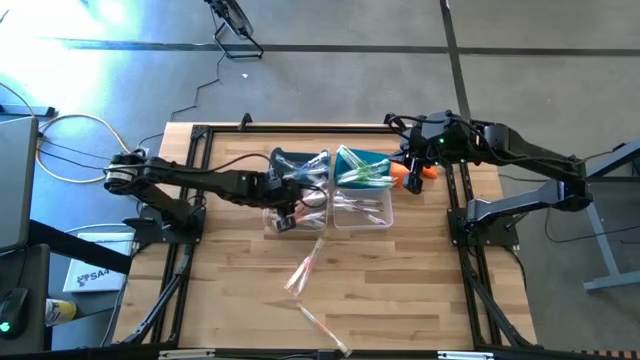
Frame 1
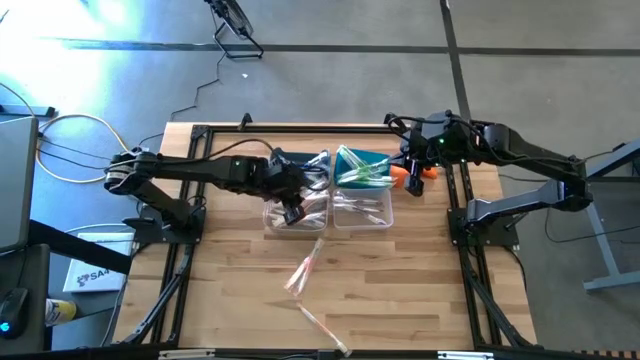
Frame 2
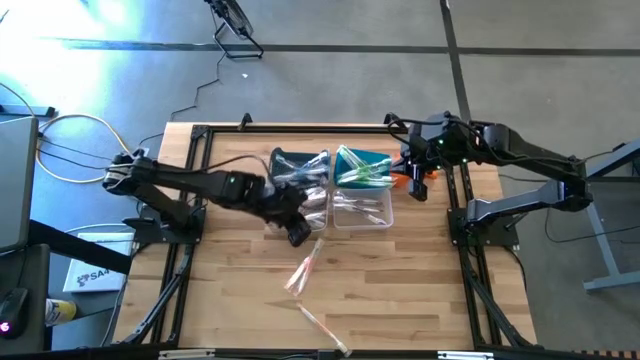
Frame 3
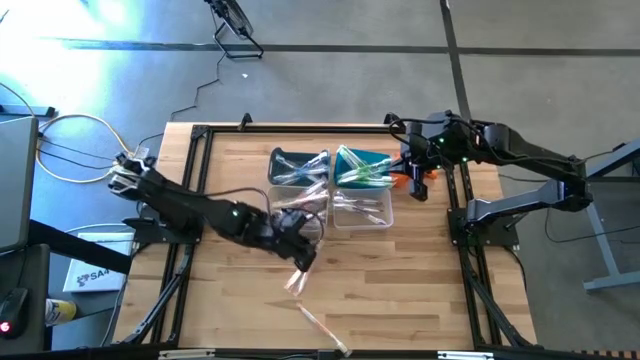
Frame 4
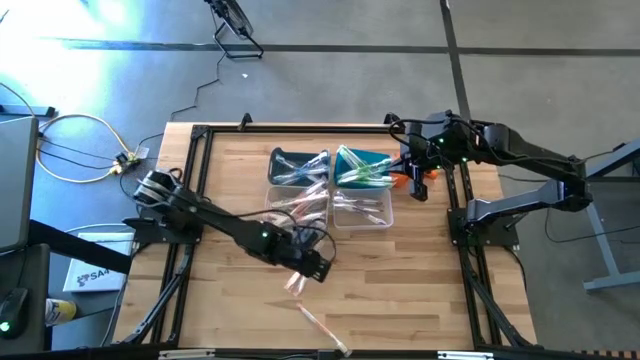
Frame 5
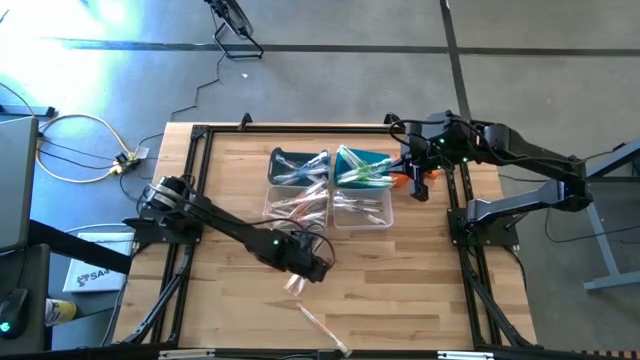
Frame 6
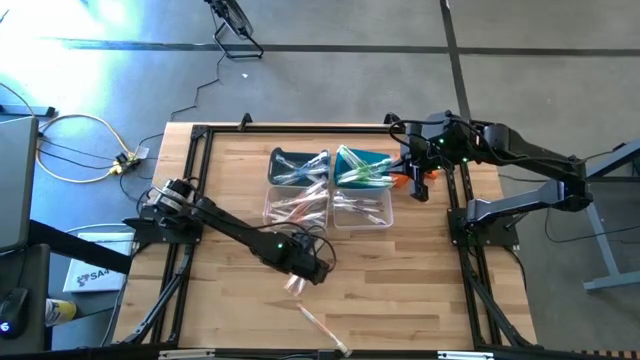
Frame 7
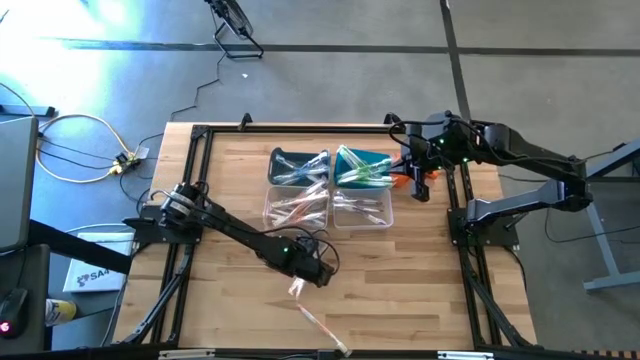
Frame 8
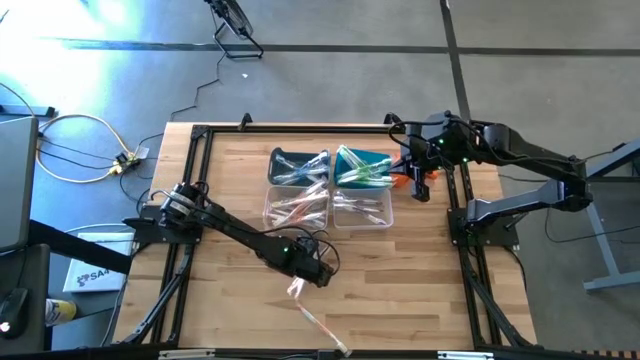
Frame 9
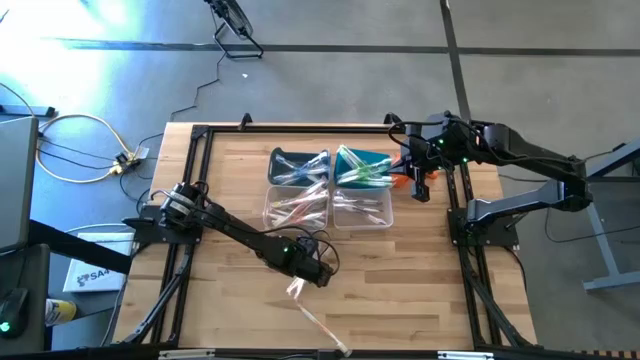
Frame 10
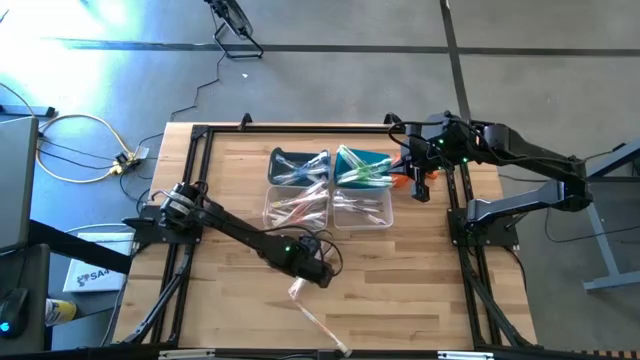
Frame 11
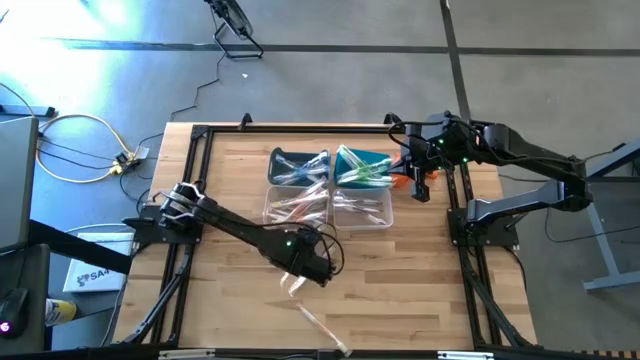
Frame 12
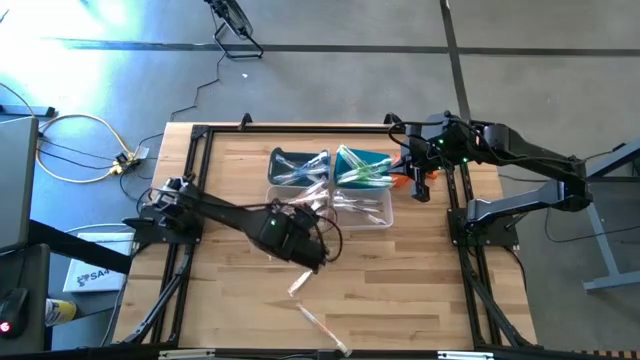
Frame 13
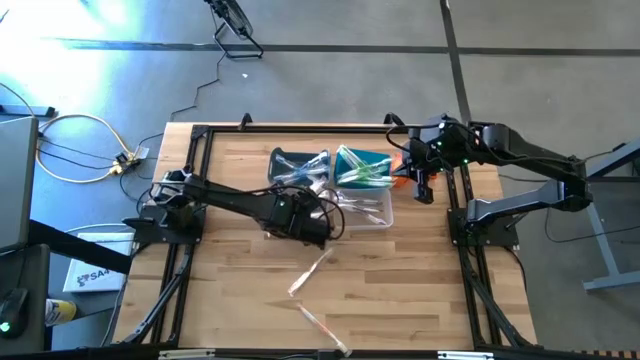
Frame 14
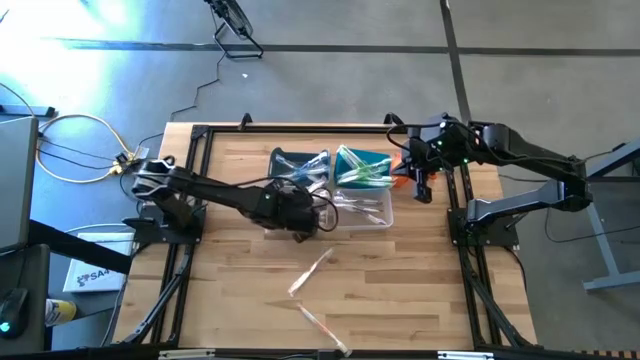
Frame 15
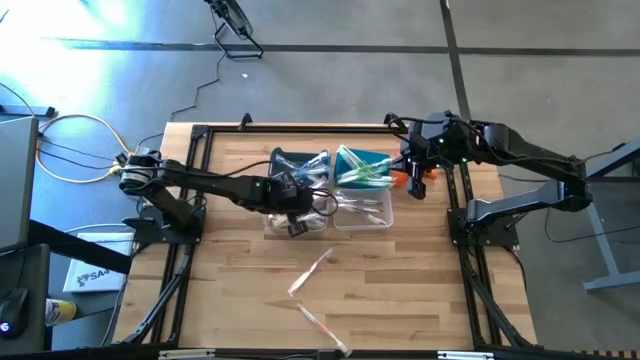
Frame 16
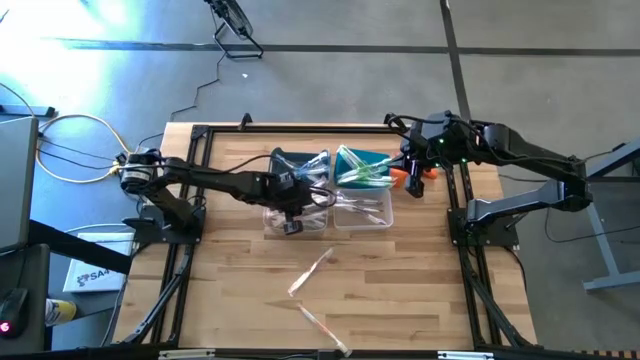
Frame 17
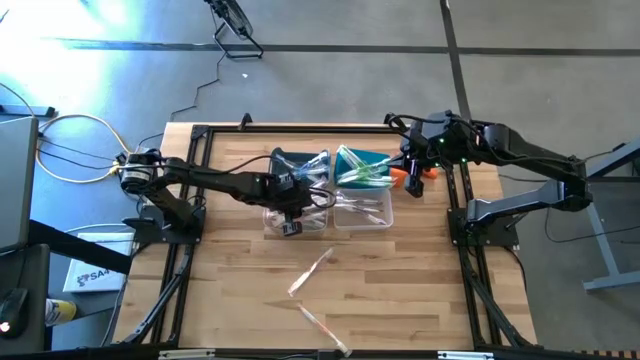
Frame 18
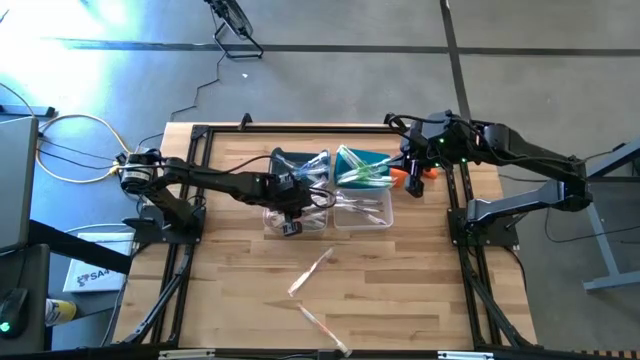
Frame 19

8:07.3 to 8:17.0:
Task: Pick & Place Toothbrushes
Put the orange toothbrush into the gray bin

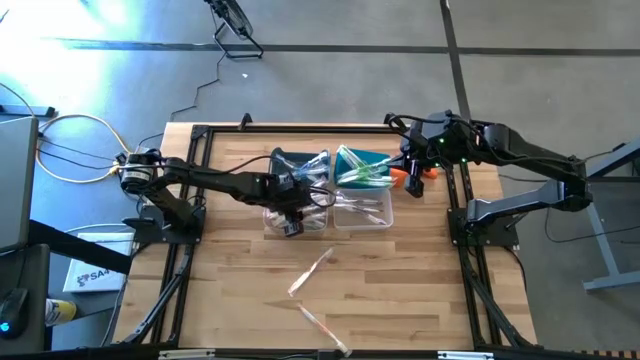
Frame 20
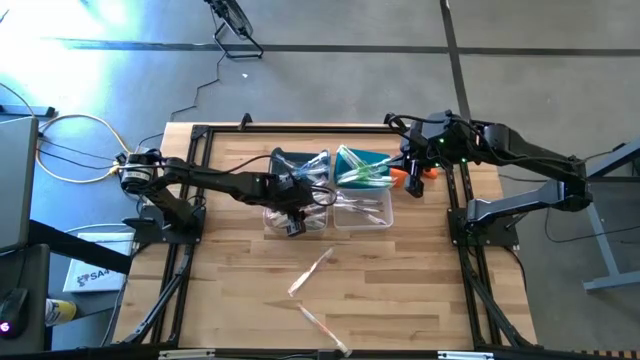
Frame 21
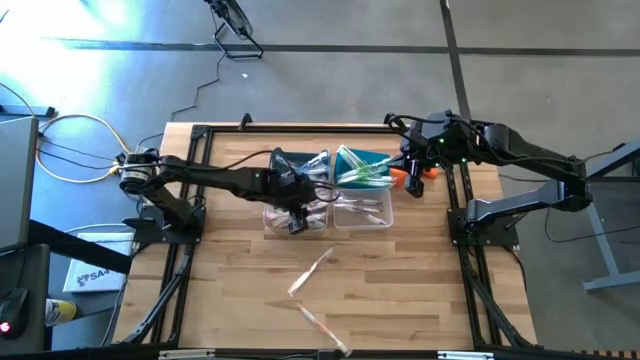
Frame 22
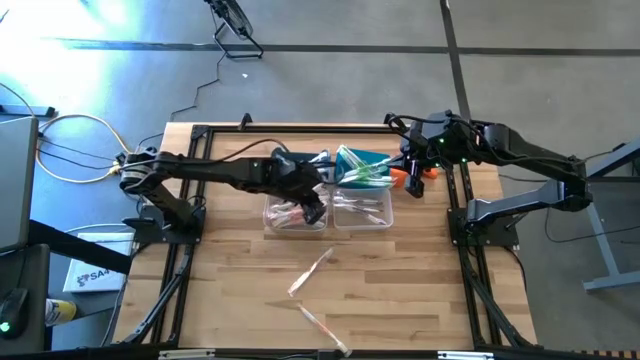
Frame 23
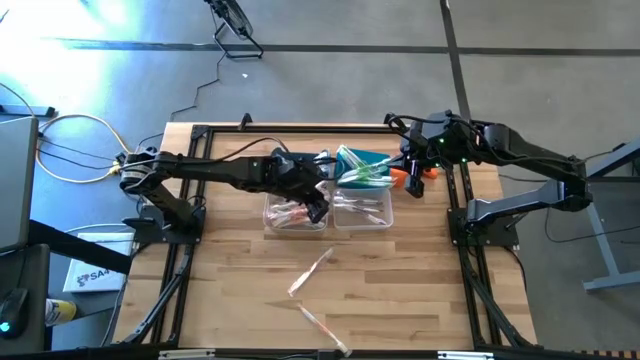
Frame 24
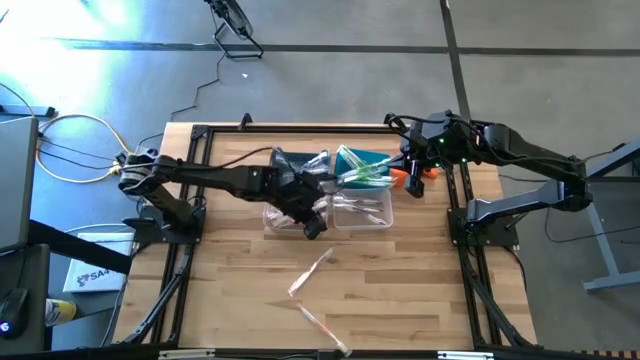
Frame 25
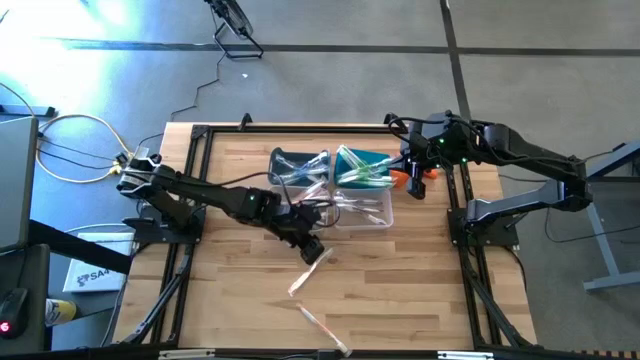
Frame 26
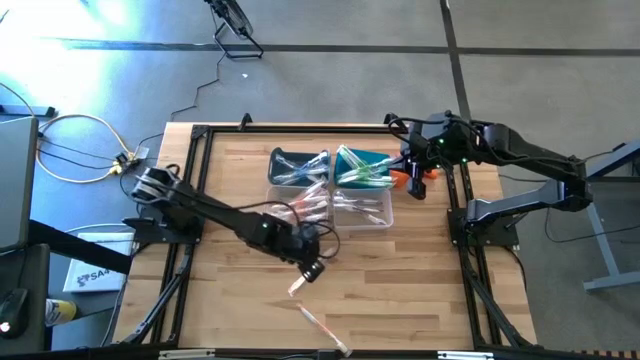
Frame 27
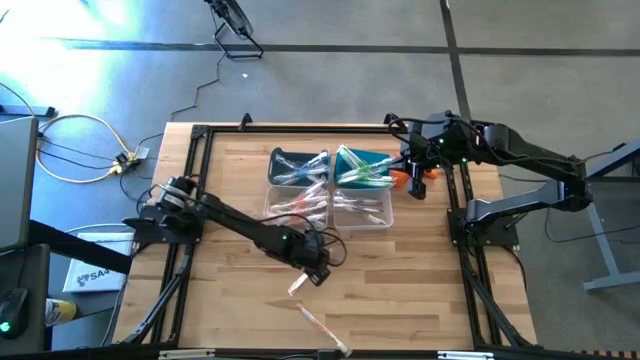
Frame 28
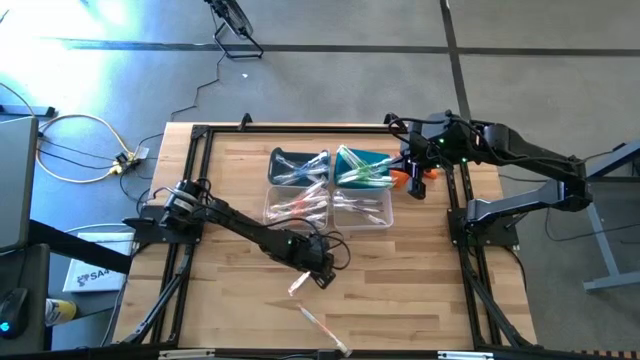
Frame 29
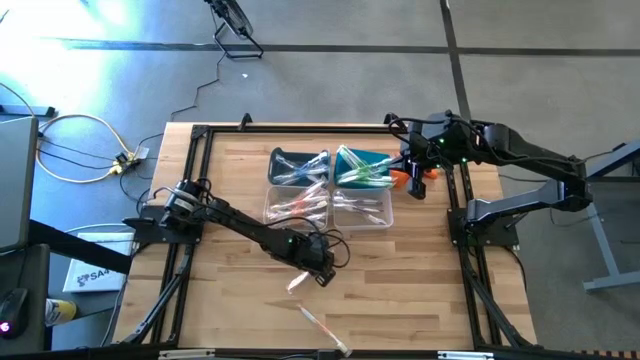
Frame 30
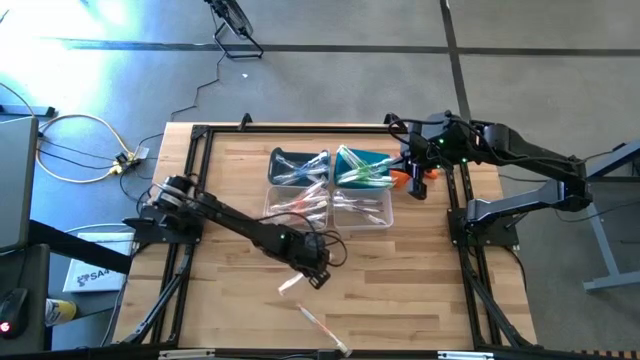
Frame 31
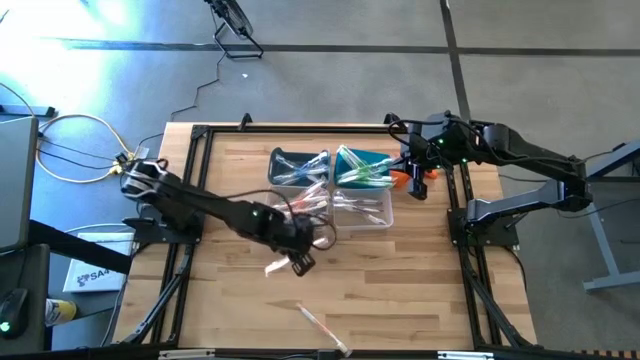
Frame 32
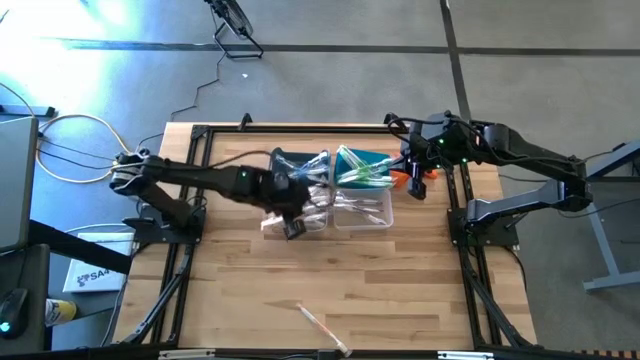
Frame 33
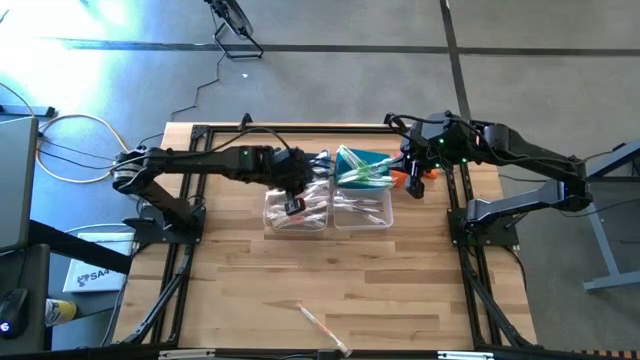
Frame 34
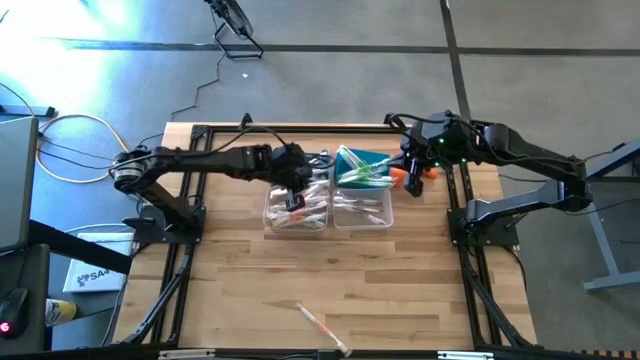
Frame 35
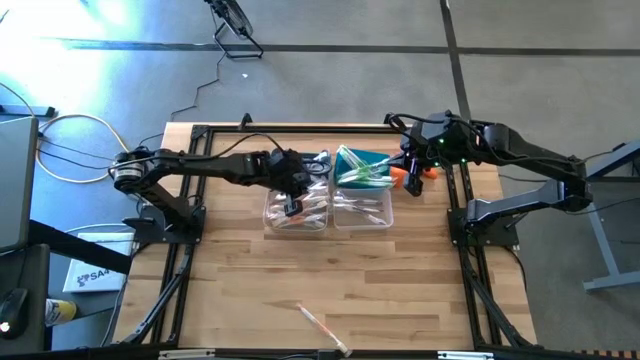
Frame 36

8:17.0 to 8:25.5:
Put the orange toothbrush into the gray bin

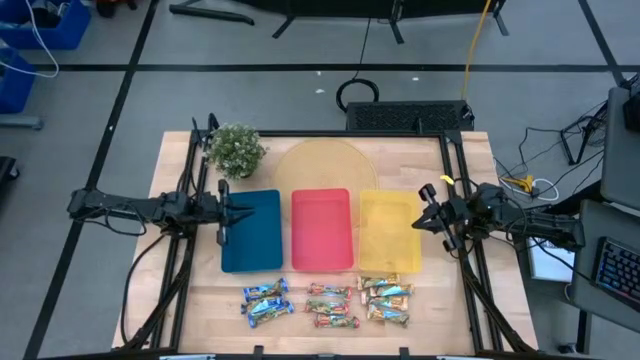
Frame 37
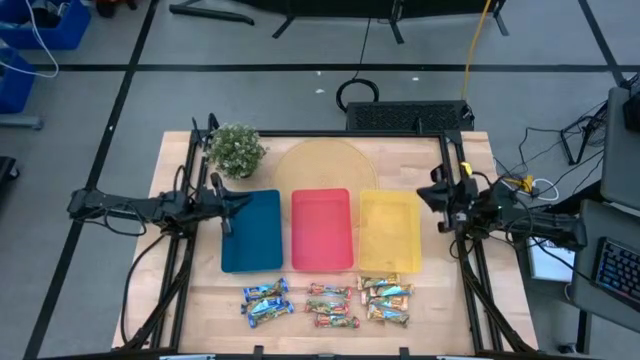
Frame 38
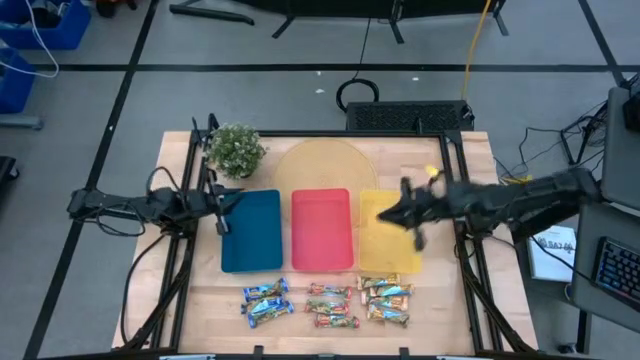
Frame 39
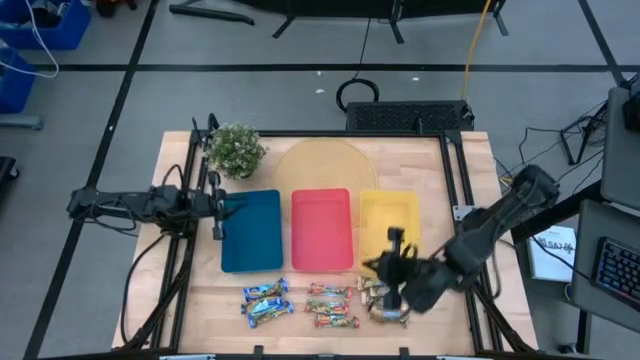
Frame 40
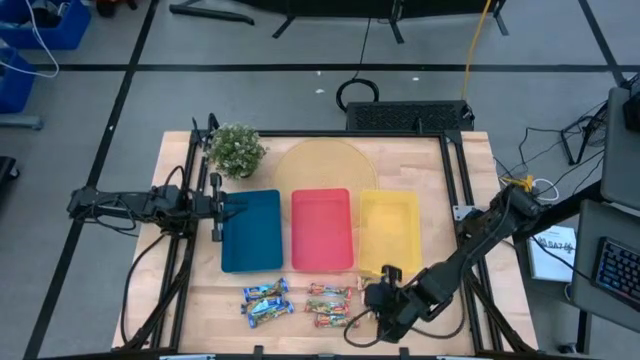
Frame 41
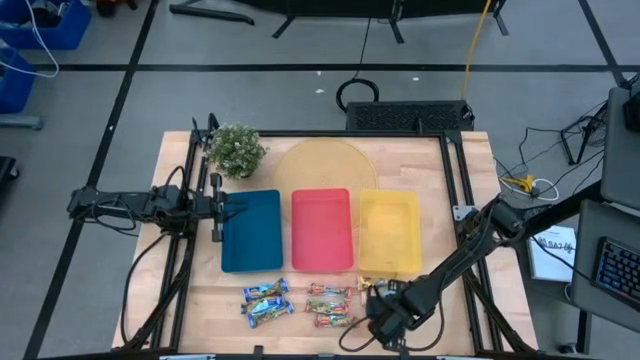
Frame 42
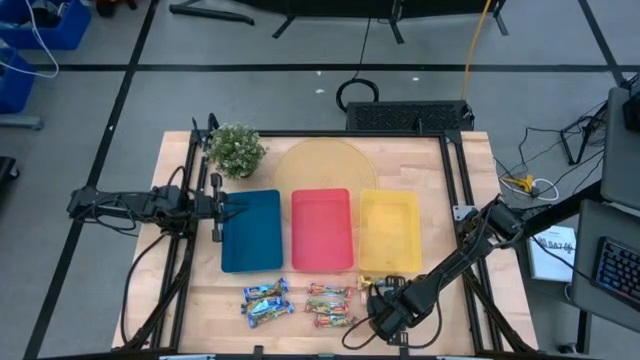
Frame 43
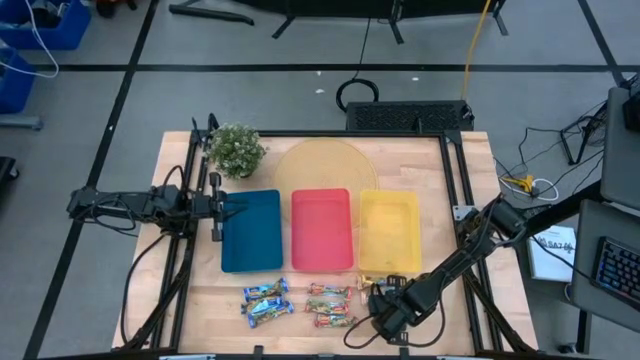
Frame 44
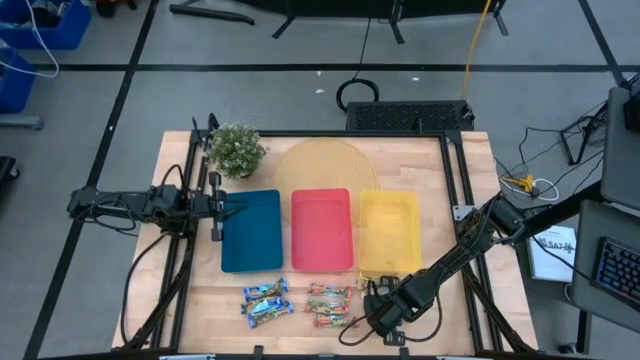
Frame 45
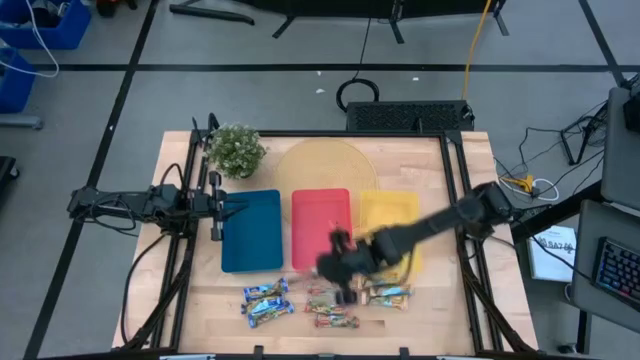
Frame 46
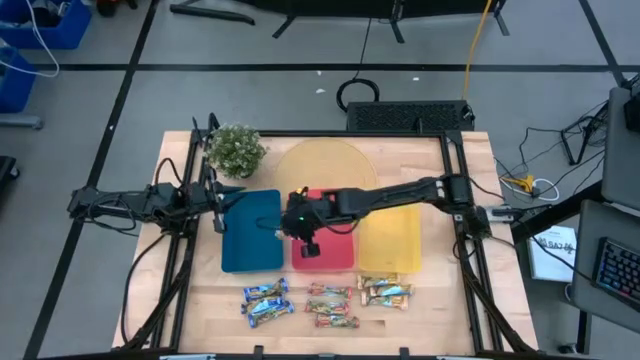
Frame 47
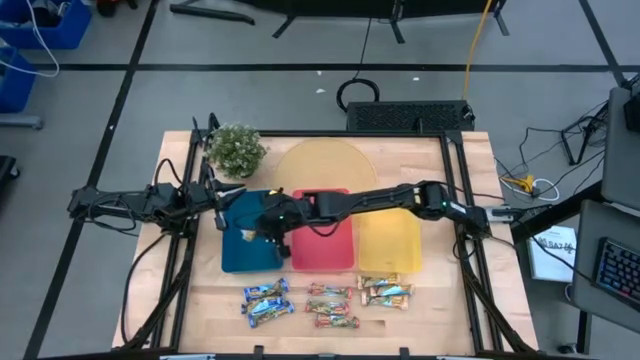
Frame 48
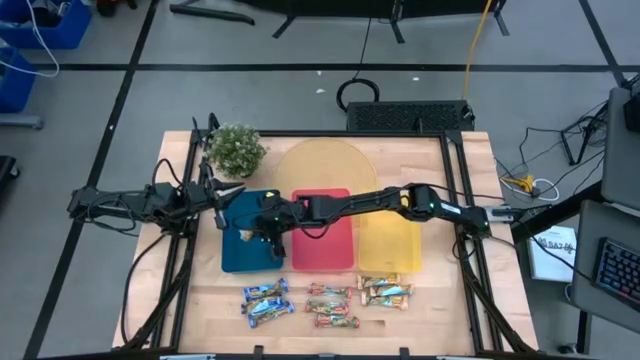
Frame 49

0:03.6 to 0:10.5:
Task: Pick and place Granola Bars by type
Put the yellow granola bar into the blue bin
